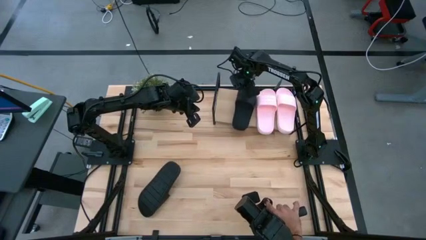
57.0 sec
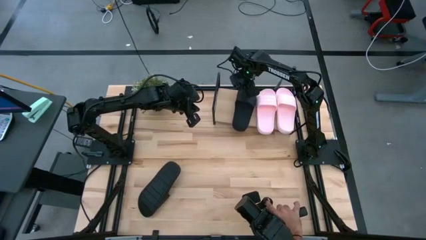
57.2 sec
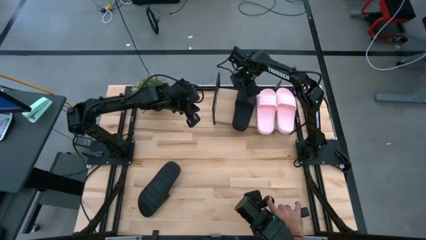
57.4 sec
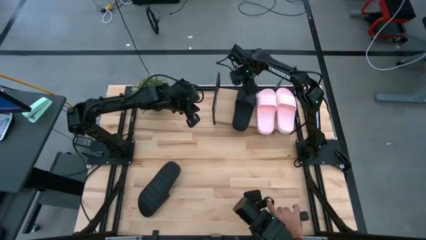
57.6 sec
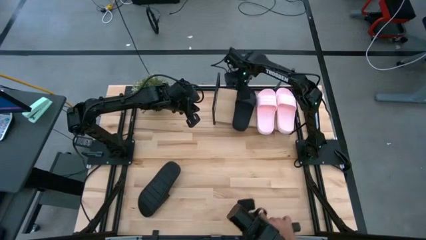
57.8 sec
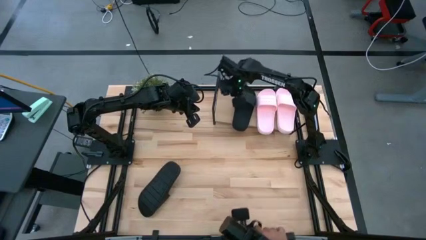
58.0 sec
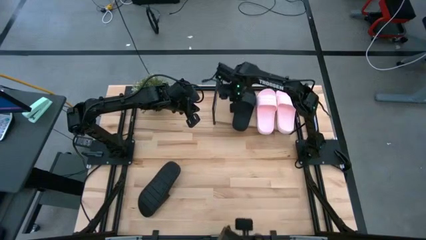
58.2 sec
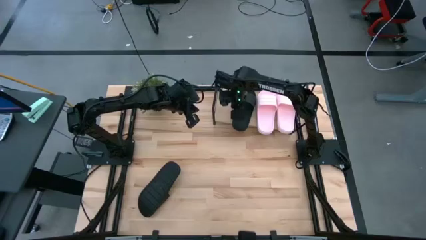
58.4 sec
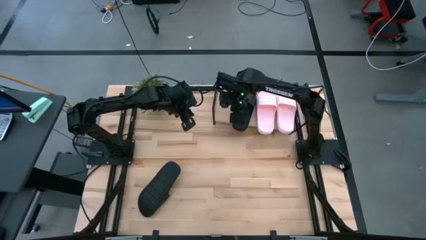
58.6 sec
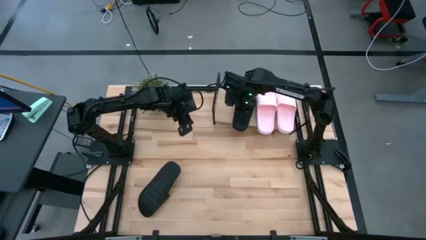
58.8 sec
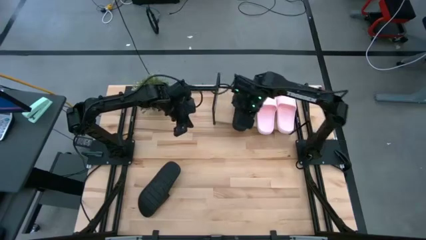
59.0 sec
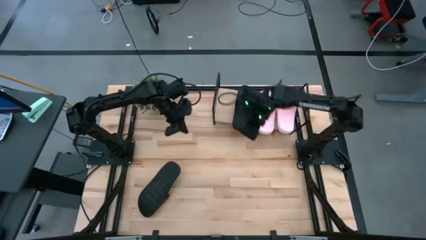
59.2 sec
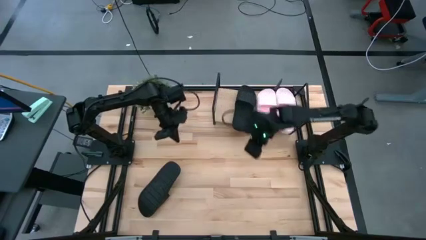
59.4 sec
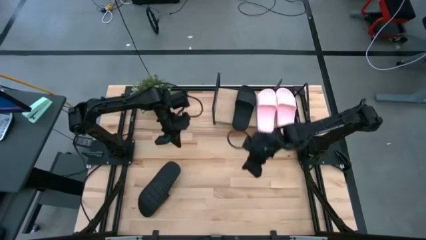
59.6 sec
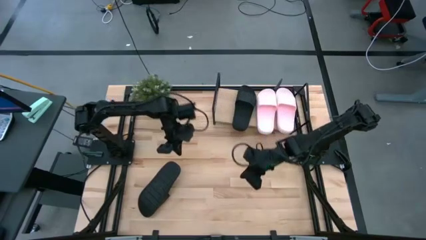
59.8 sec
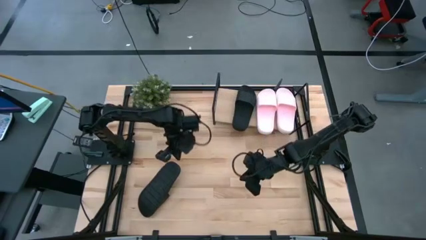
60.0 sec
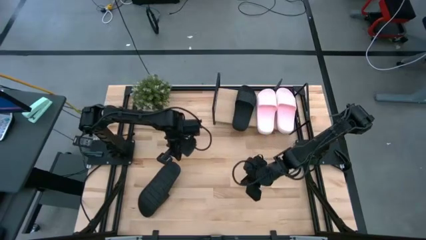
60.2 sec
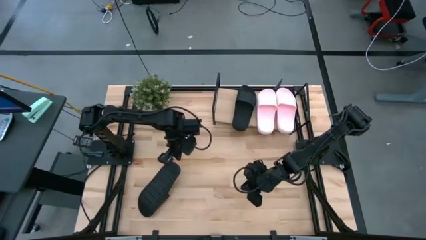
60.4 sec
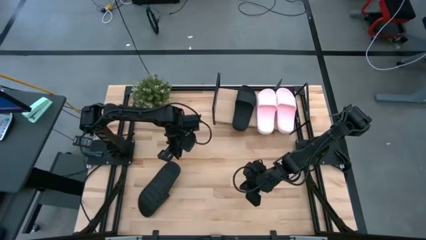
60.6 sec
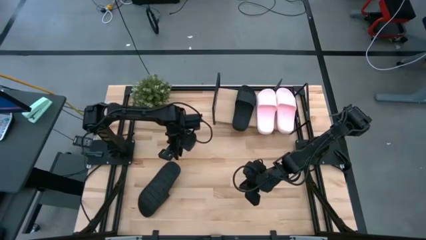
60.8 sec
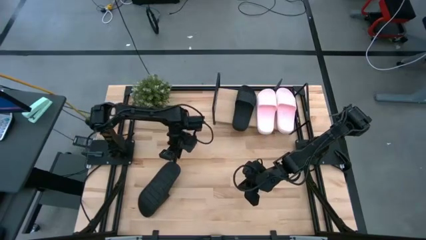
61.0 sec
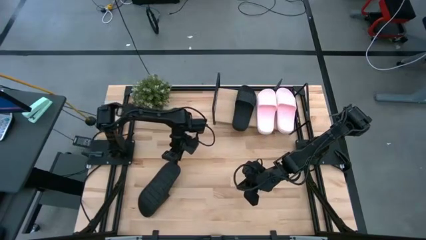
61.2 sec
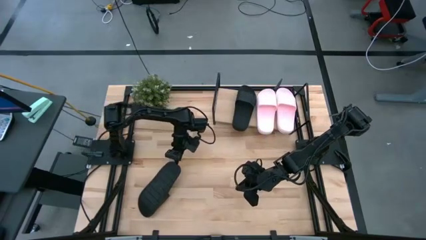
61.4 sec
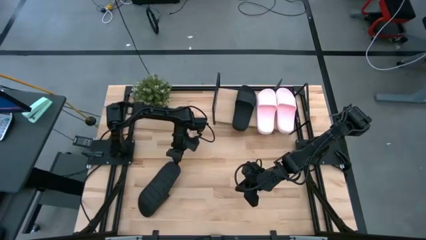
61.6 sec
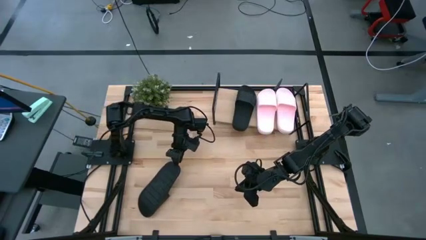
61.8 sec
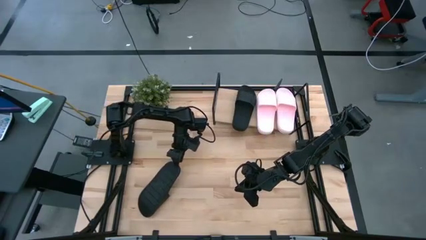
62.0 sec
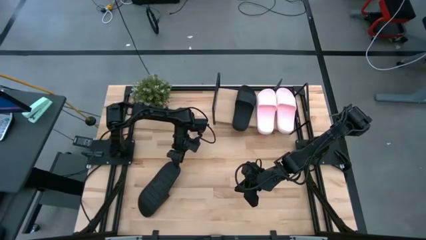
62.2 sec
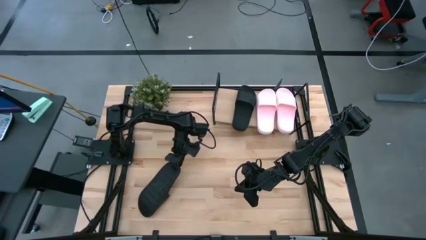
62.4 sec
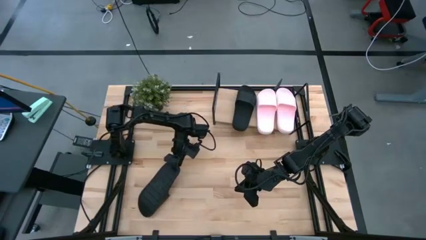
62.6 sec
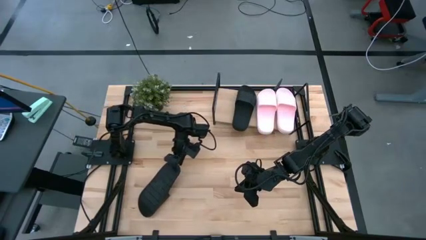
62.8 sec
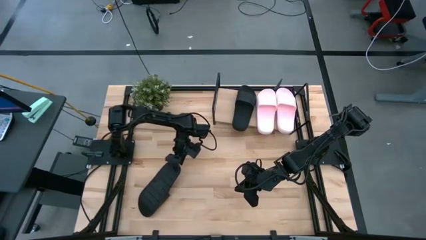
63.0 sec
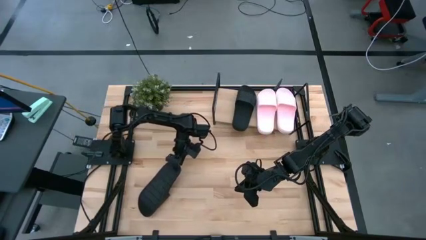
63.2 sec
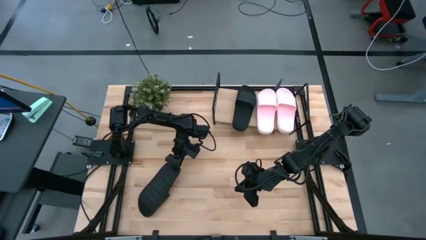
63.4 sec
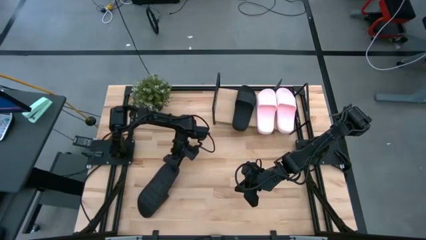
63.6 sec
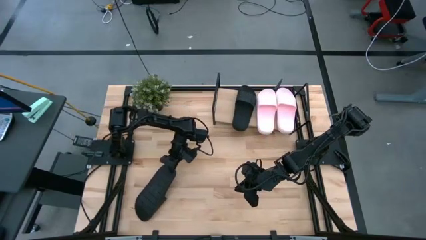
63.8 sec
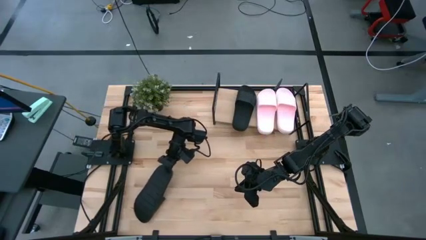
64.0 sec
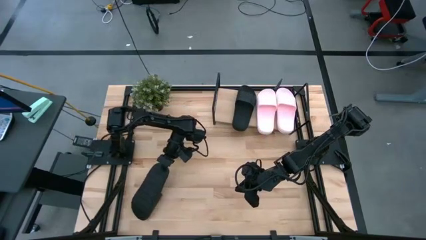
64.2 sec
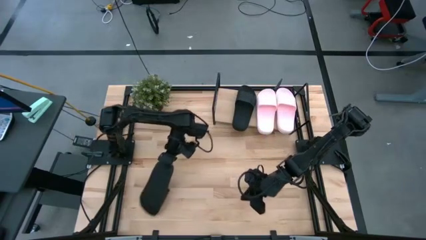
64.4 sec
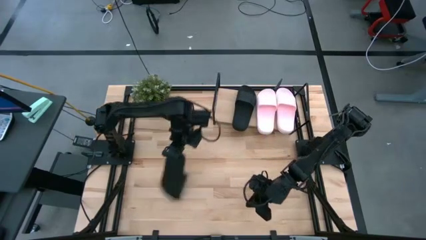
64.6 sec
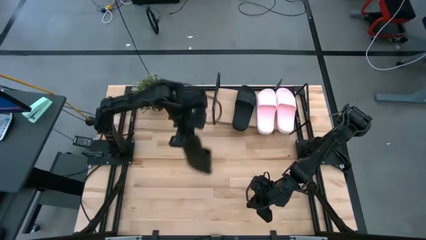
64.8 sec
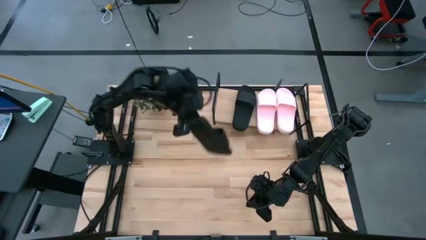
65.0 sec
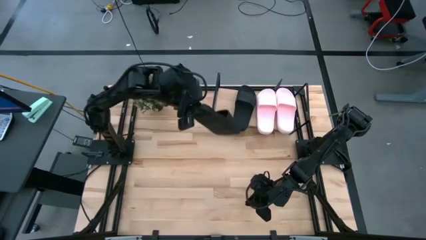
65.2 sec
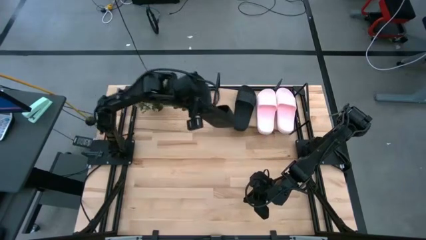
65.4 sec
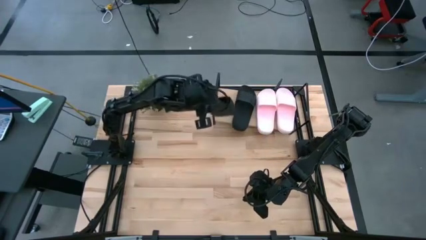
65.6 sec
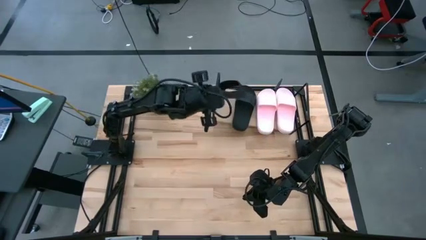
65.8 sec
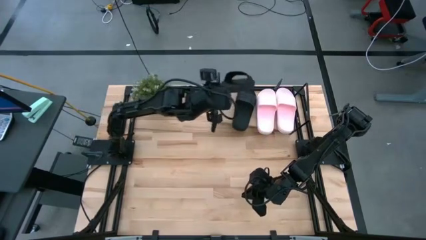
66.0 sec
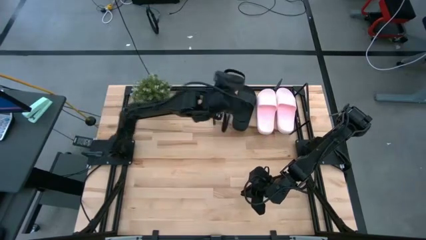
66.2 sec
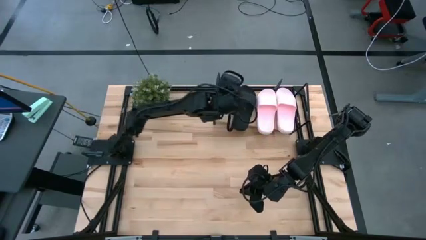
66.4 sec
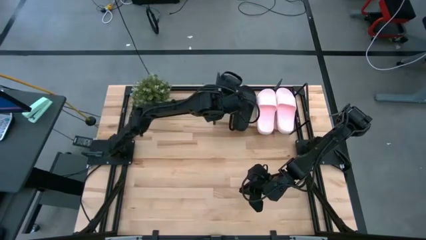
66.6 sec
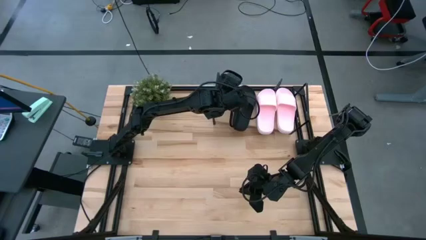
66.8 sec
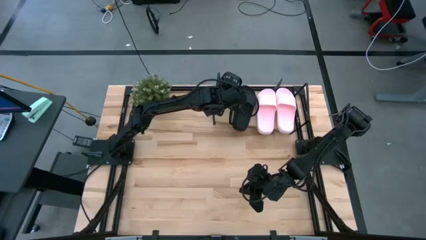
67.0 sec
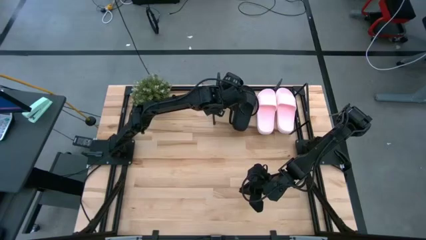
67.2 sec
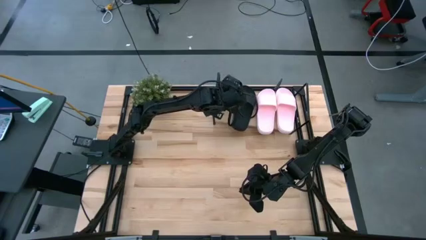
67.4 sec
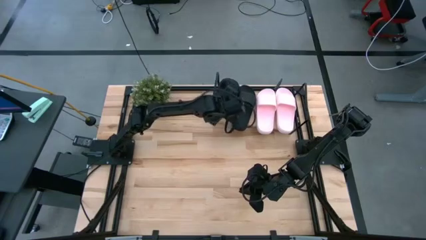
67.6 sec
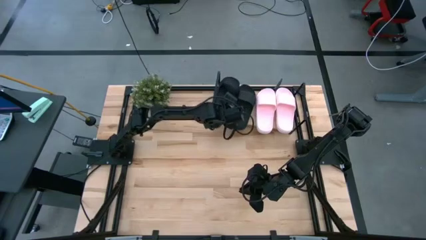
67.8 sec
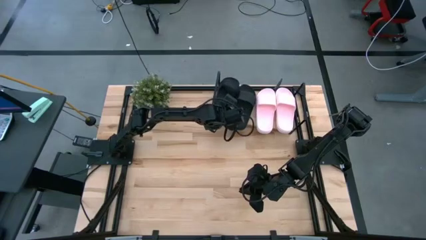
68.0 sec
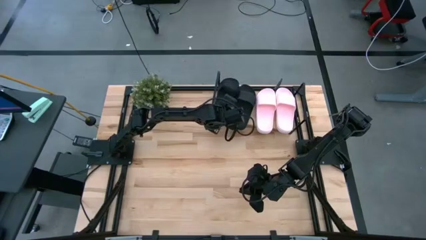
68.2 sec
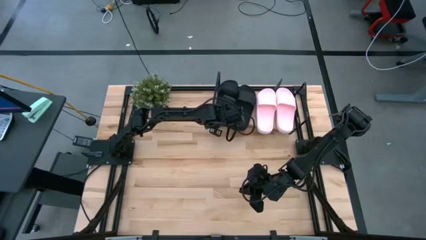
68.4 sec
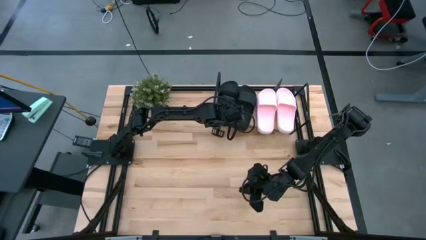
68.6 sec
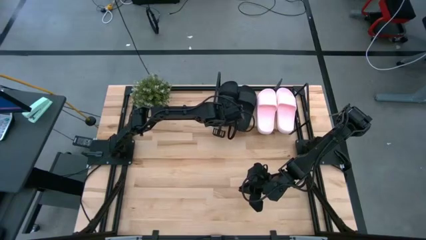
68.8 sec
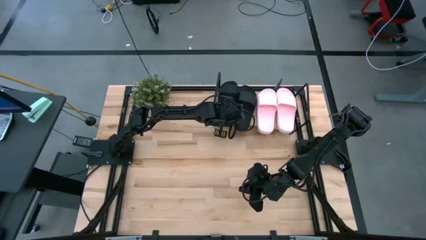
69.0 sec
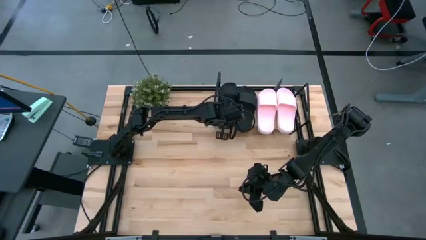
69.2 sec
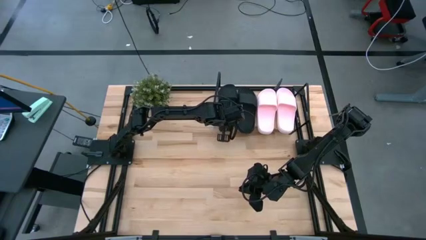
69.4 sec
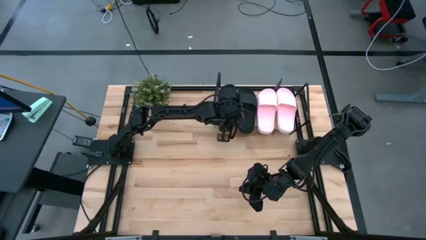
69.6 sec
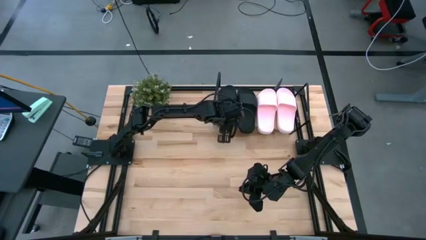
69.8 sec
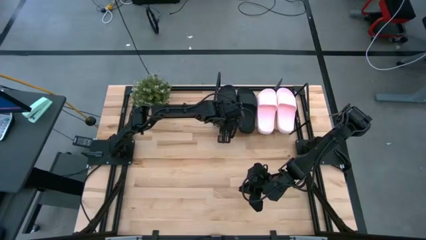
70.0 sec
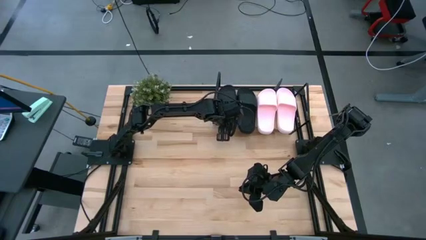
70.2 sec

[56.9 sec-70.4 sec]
Task: Pick and place slides into the shelf
Put the black slide on the shelf

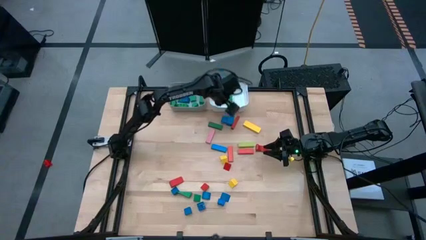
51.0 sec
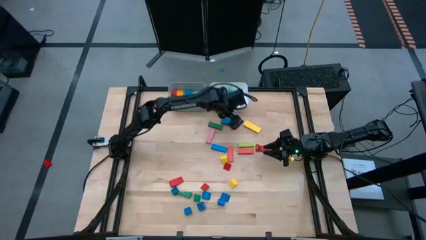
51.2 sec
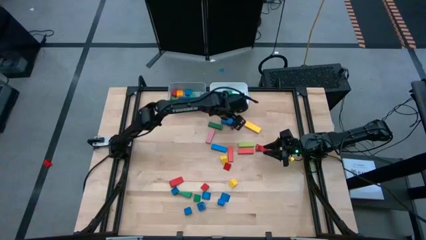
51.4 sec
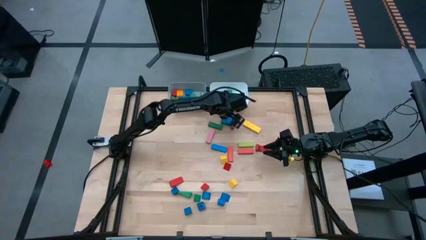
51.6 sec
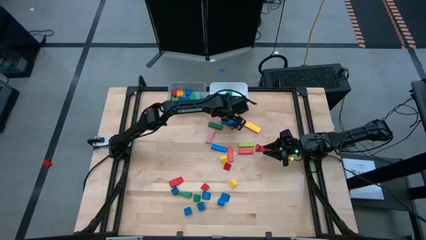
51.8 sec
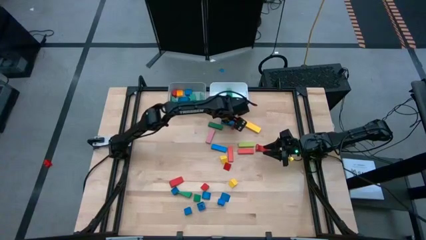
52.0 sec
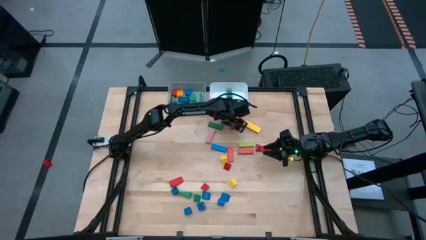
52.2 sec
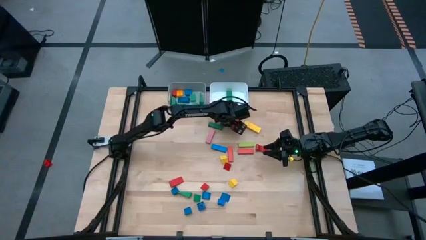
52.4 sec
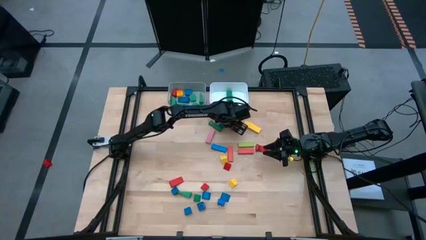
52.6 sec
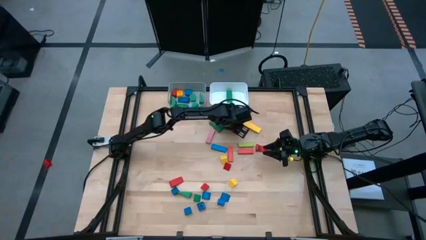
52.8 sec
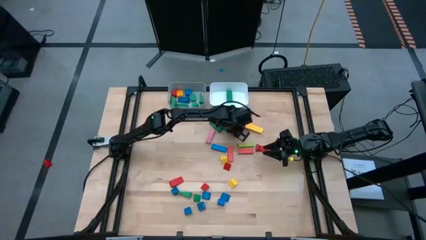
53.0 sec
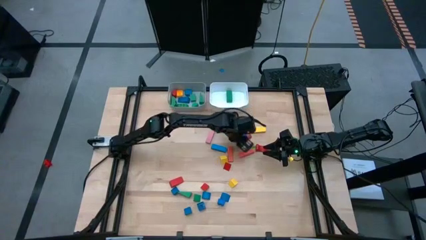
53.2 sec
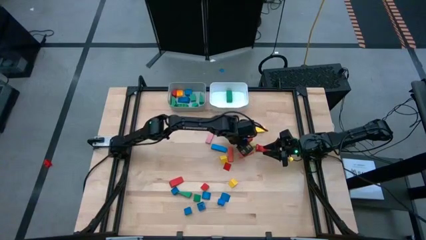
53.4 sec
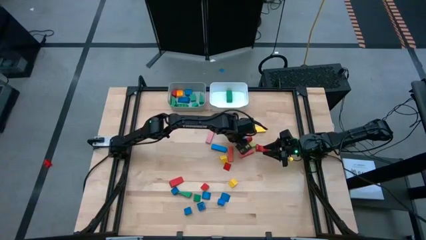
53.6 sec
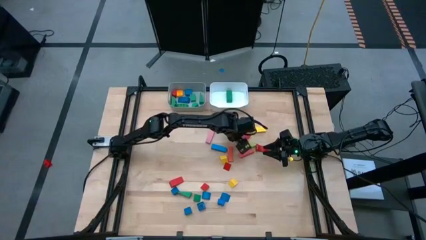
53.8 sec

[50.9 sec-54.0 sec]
Task: Sort blocks by size
Put the blue rectangular block into the white bin

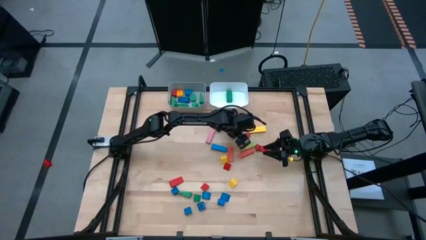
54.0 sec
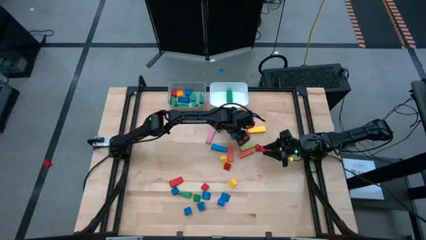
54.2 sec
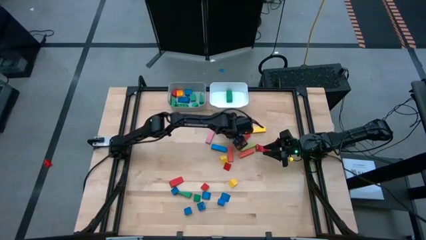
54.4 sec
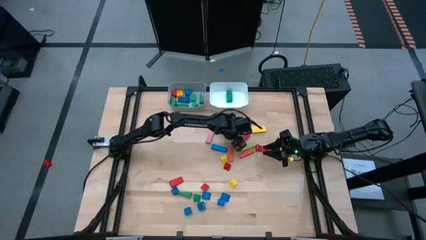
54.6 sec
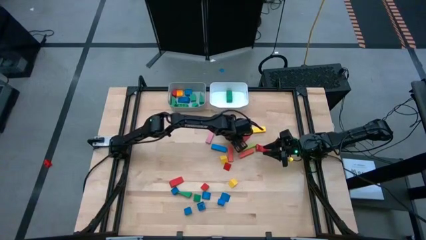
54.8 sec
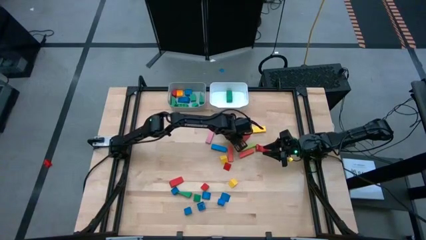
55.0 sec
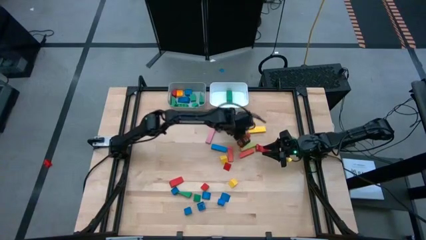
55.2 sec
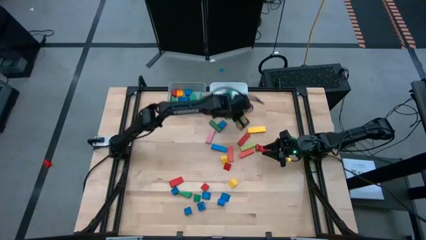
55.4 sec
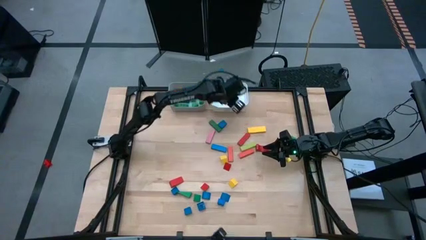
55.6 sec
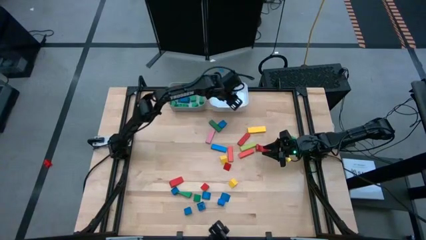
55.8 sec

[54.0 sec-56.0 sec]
Put the blue rectangle block into the white bin
